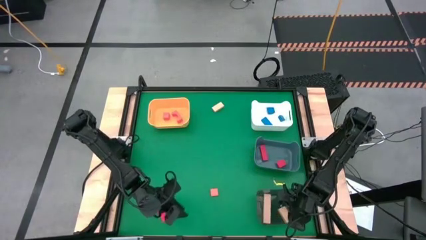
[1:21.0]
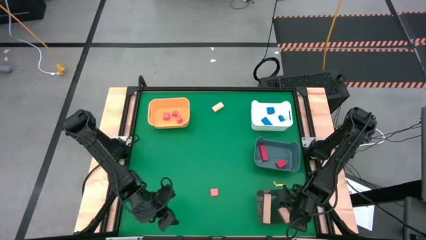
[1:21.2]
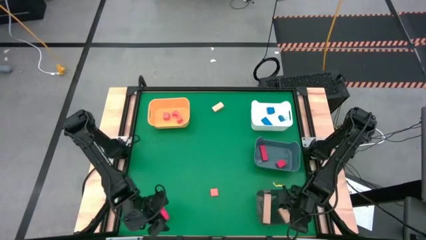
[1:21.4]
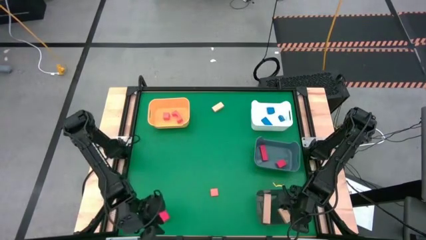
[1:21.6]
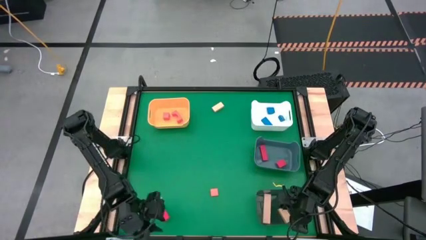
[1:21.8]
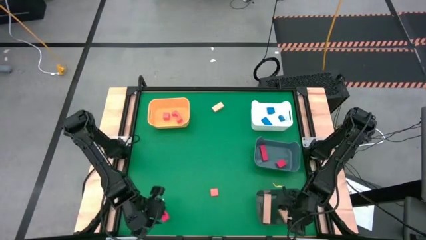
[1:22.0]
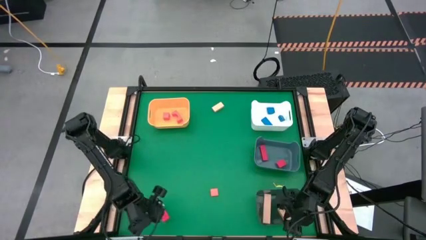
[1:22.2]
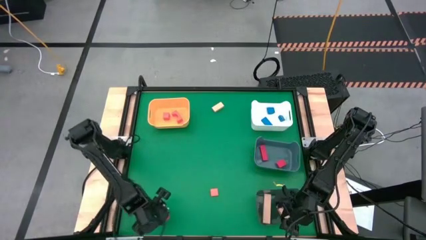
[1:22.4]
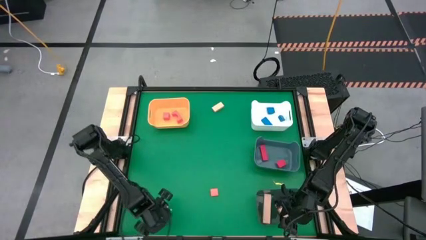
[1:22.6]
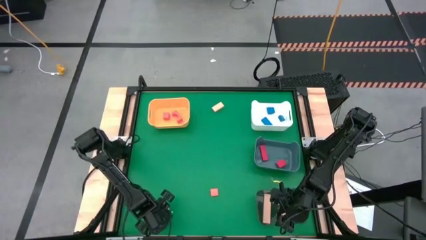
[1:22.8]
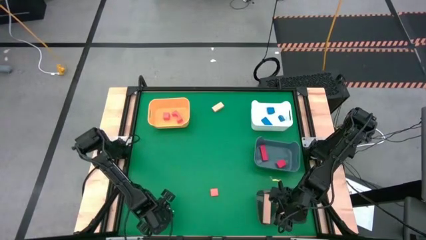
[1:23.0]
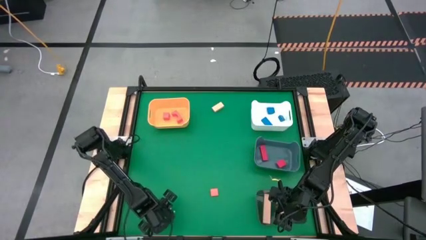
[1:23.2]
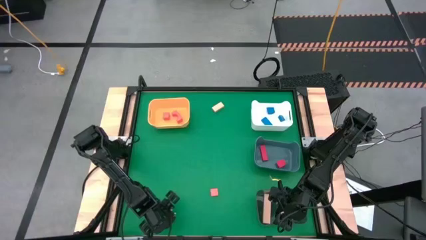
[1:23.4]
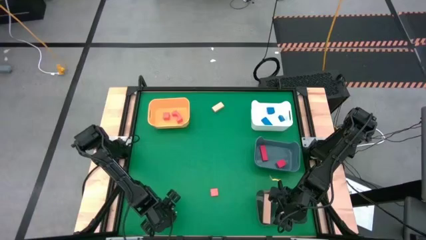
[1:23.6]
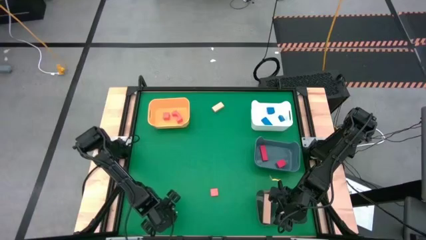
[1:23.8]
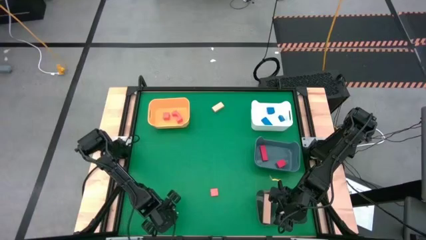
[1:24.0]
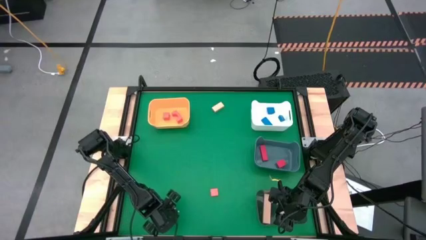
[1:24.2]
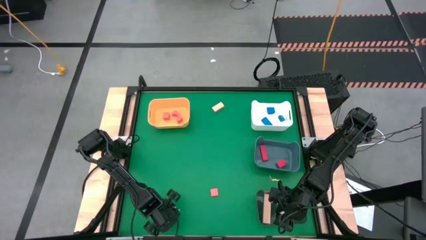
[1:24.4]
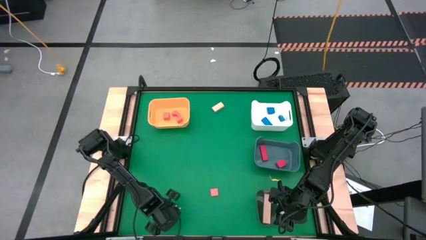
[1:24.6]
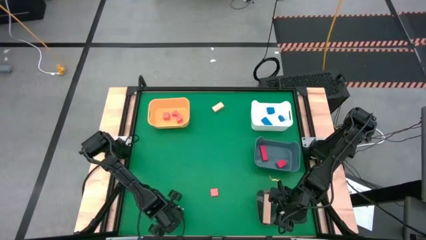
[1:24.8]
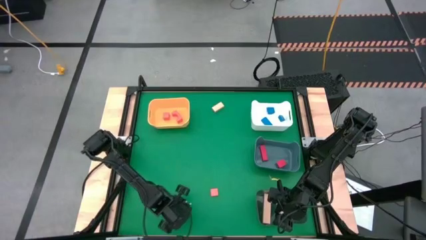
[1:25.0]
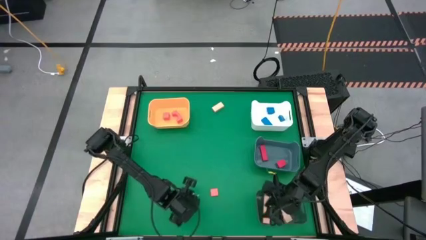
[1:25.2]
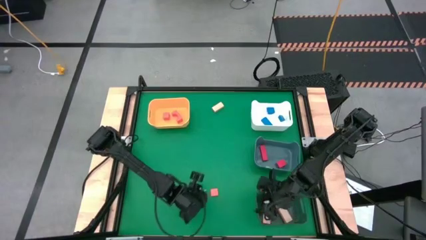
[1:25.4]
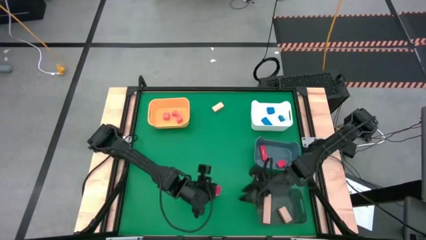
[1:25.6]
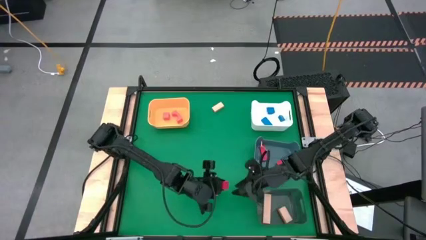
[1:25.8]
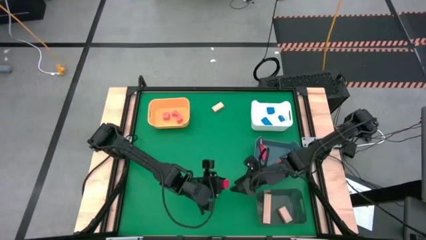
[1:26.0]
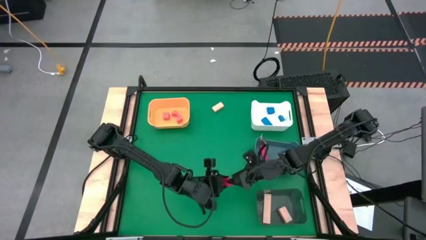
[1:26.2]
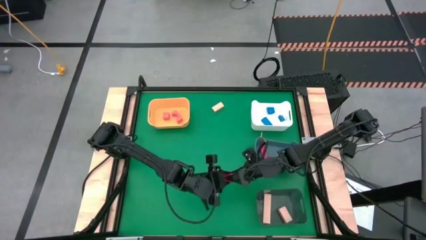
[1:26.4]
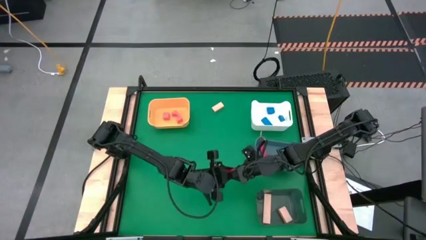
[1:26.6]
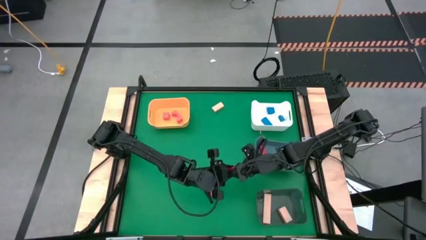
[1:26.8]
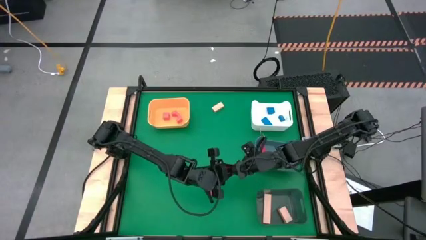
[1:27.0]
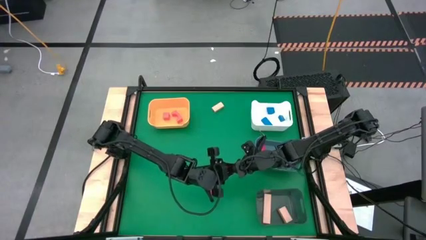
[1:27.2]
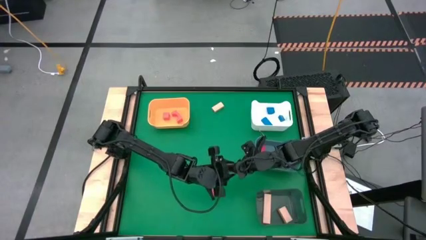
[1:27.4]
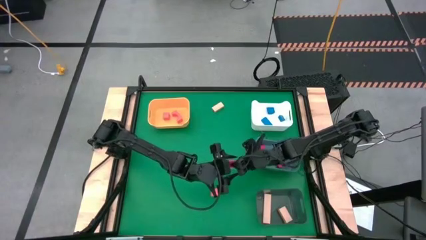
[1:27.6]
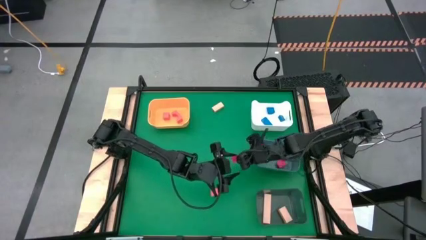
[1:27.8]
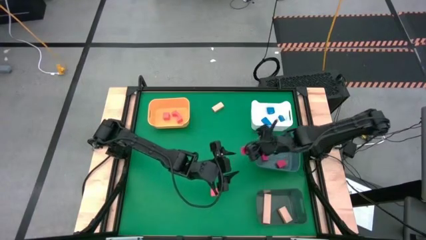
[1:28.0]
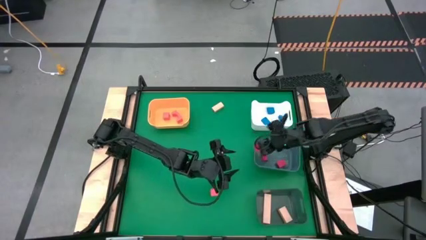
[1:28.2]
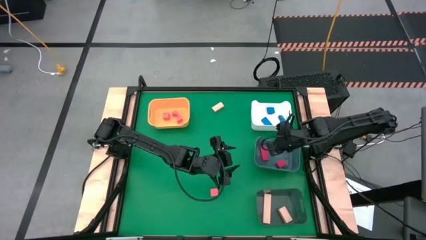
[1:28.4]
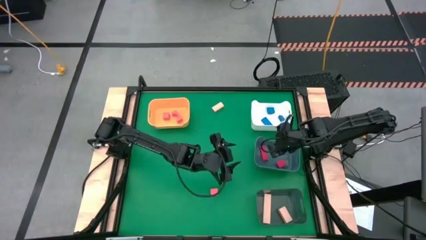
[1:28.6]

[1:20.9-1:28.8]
Task: Sort & place blocks by color
Put the red block into the blue bin

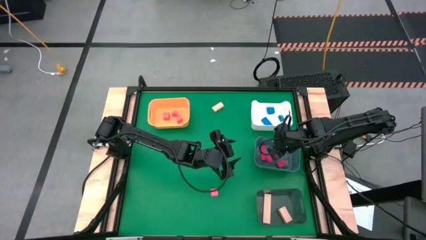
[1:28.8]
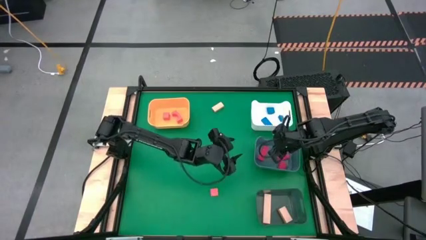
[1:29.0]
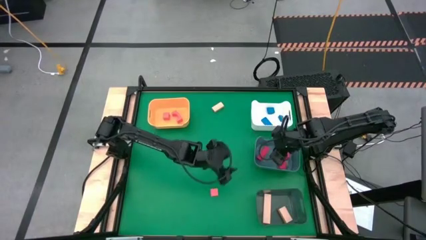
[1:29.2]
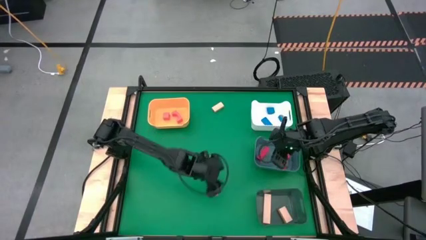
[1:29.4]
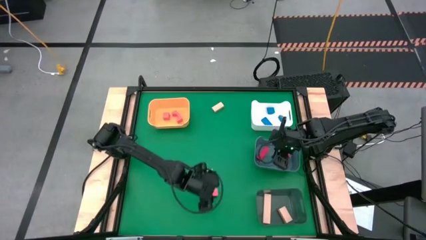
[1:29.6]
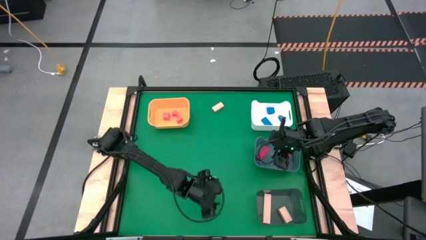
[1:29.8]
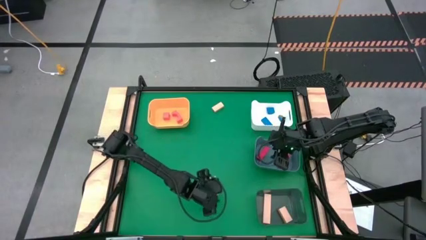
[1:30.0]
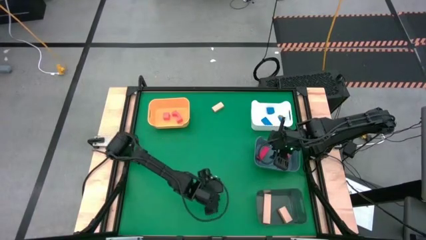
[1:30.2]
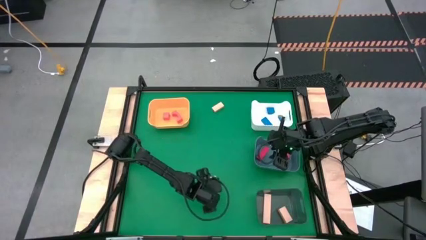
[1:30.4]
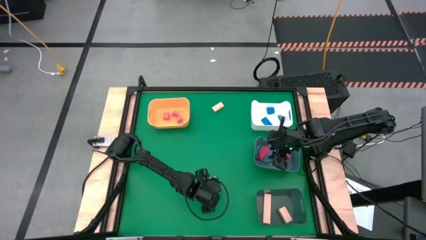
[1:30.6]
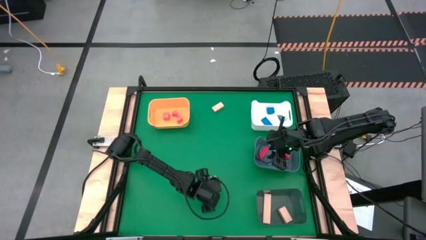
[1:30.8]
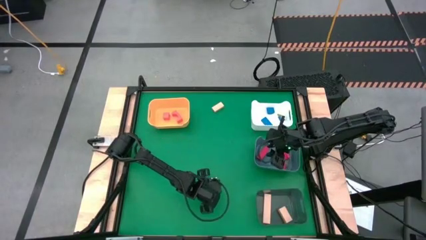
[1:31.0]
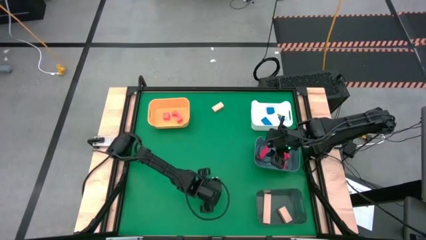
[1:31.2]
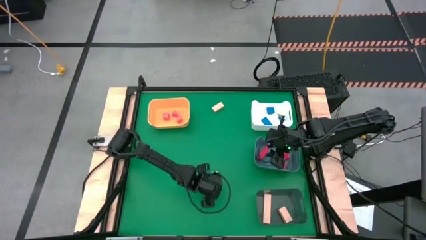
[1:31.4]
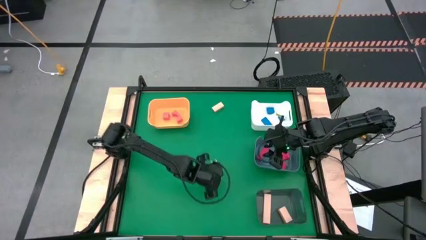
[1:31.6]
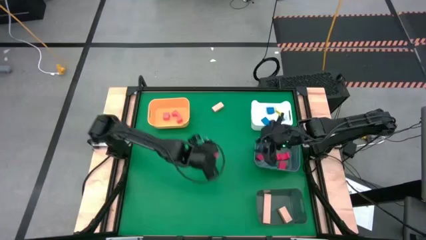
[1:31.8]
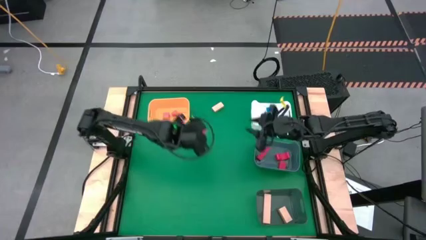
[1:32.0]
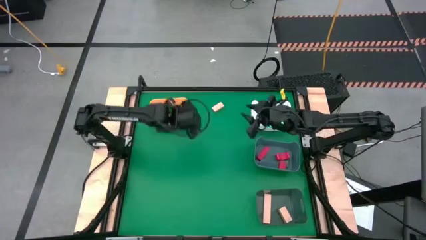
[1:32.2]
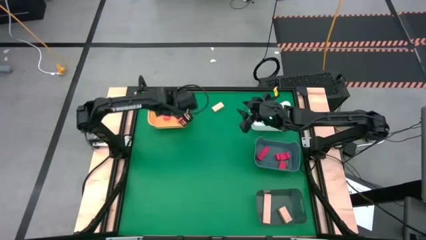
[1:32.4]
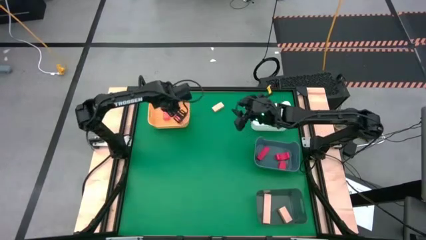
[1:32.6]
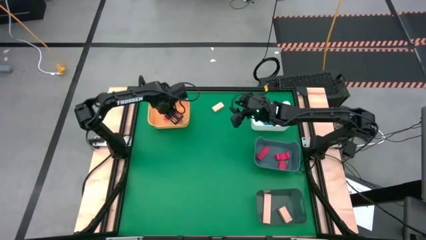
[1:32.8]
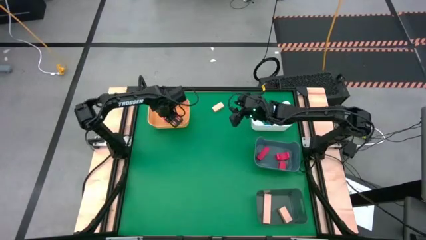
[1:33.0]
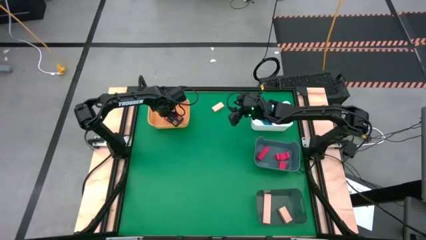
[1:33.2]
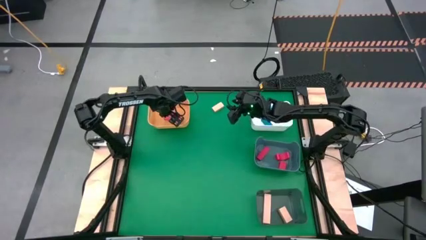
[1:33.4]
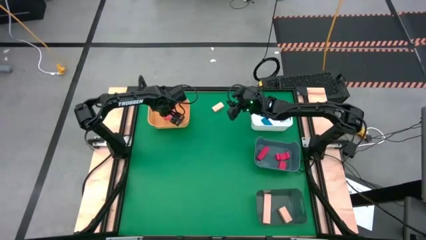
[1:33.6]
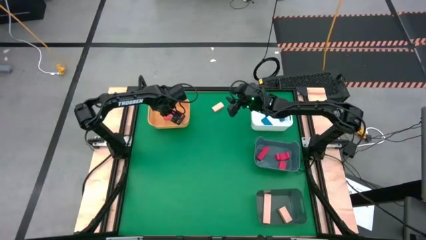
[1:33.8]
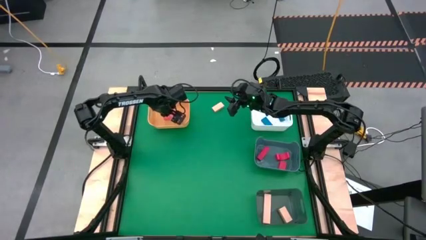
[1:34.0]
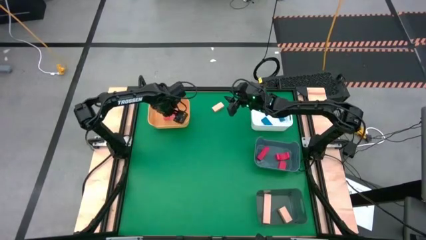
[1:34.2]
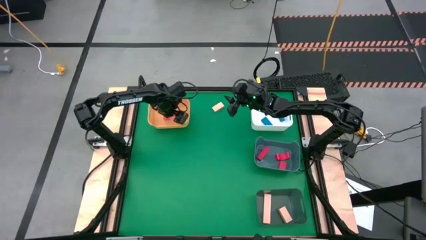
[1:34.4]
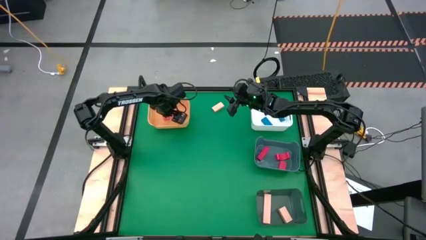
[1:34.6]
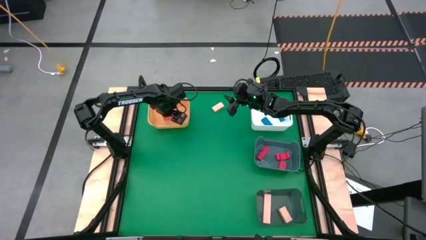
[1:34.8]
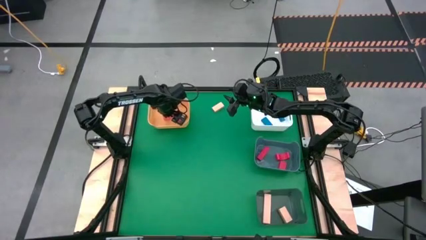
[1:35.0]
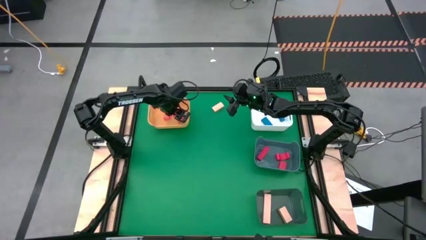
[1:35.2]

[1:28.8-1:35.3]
Put the orange block into the yellow bin

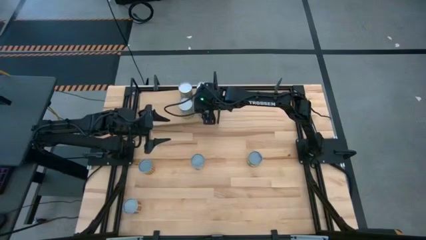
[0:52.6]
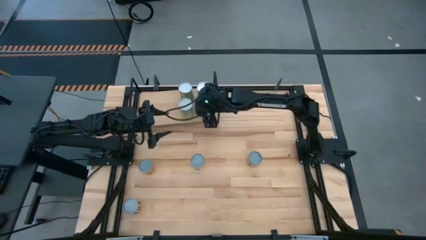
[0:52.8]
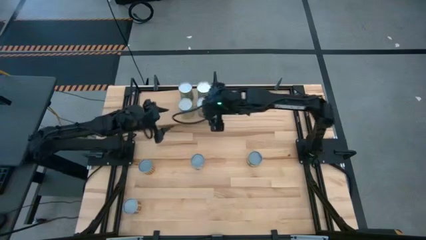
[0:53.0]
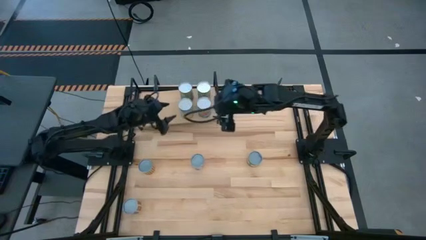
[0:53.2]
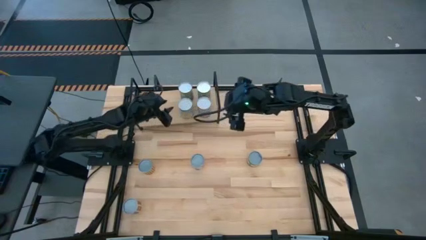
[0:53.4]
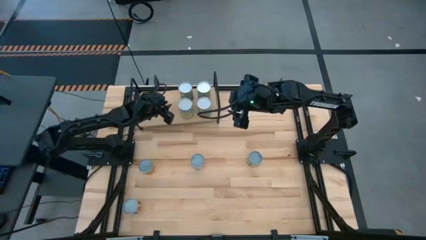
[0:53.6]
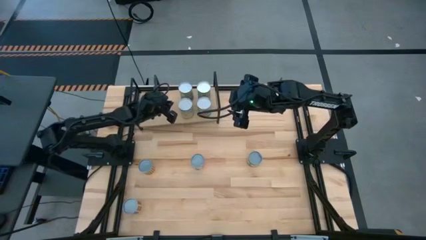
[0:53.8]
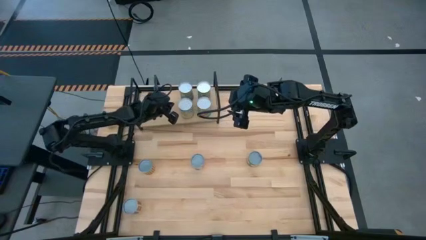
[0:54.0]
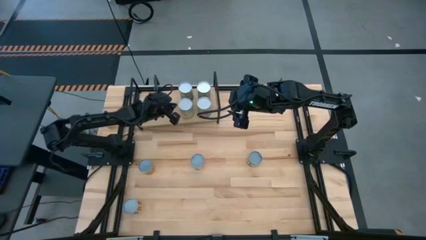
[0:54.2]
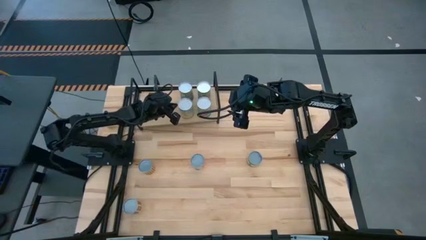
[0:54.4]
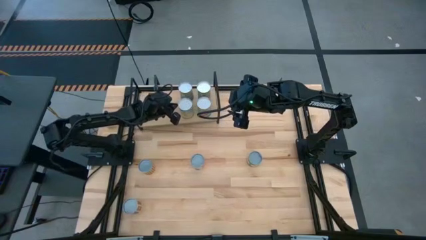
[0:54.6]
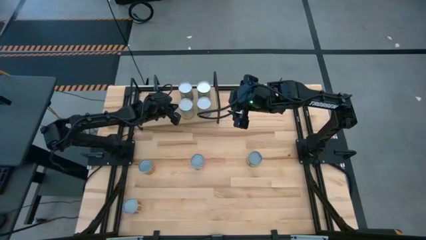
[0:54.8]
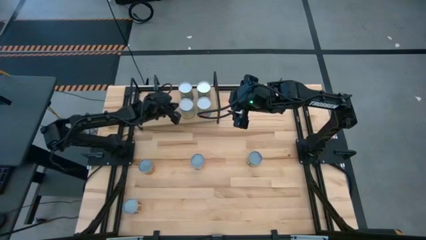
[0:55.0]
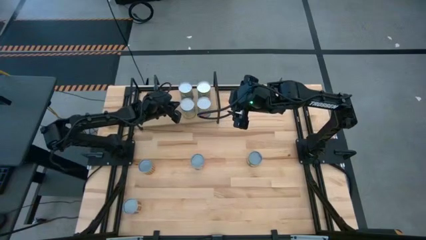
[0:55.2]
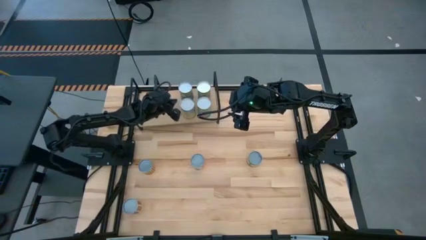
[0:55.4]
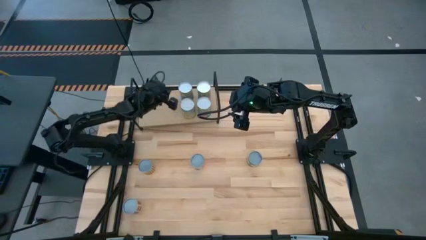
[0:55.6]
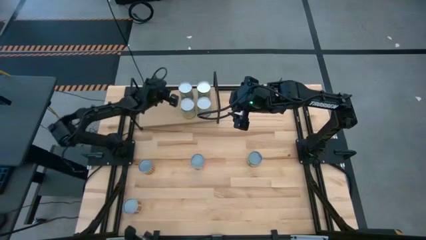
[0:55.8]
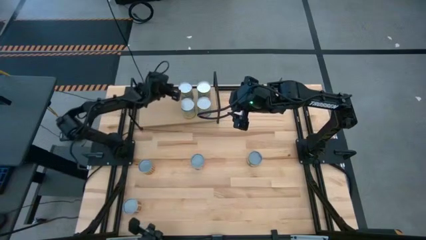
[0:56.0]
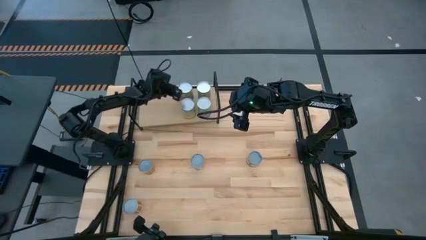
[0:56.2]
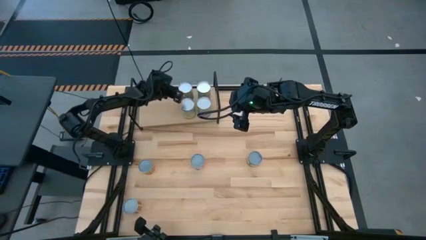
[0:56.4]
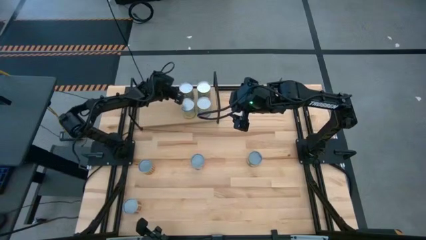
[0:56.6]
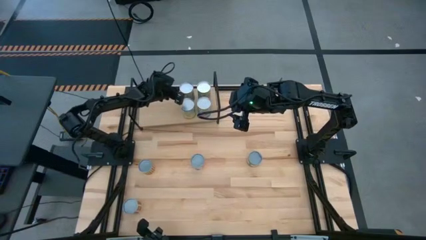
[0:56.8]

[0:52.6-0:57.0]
Task: Pick and place cans onto a shelf
Adjust the canned goods on the shelf
